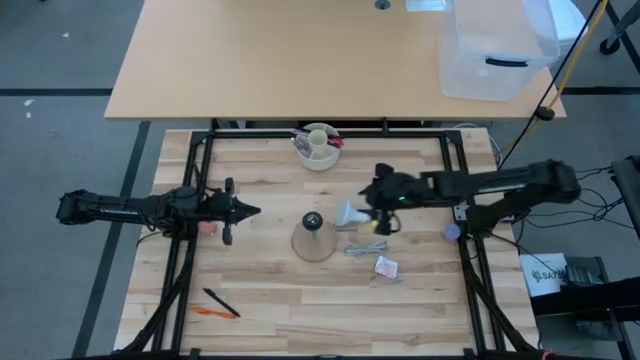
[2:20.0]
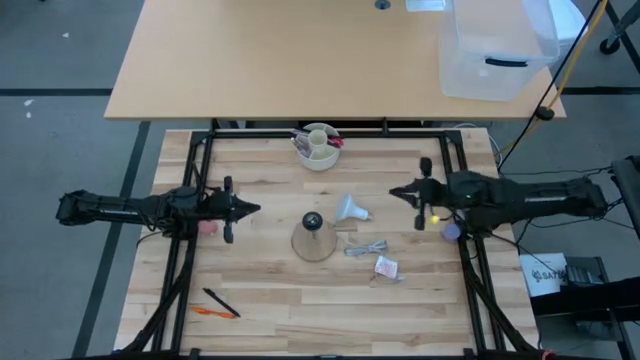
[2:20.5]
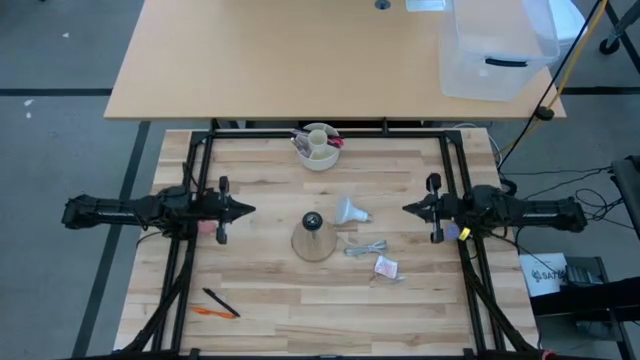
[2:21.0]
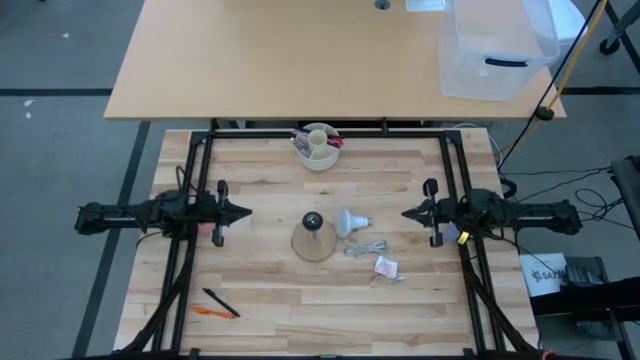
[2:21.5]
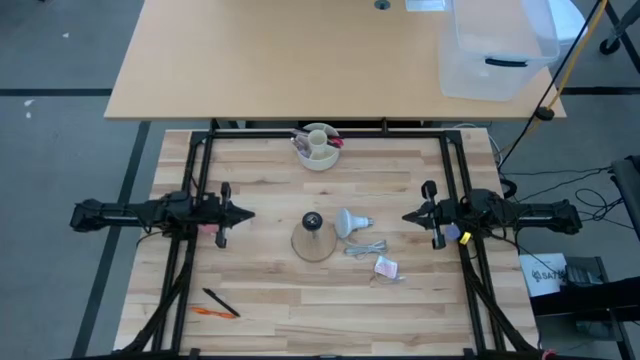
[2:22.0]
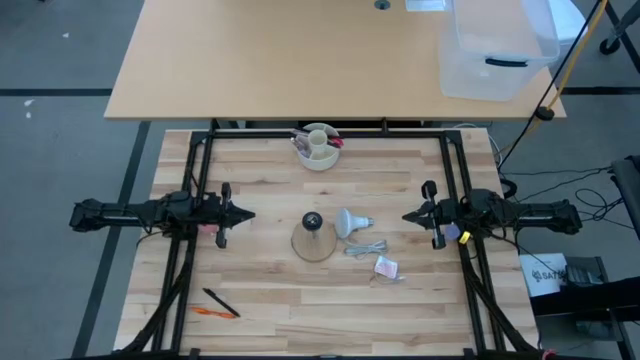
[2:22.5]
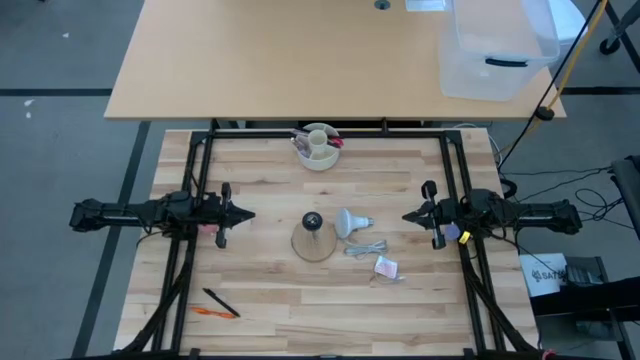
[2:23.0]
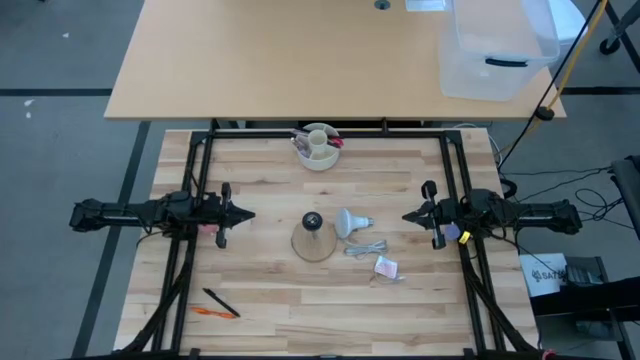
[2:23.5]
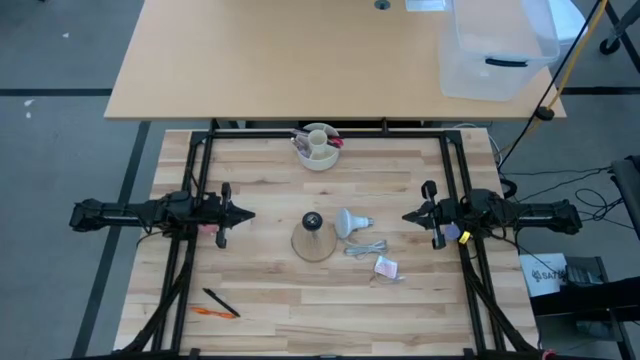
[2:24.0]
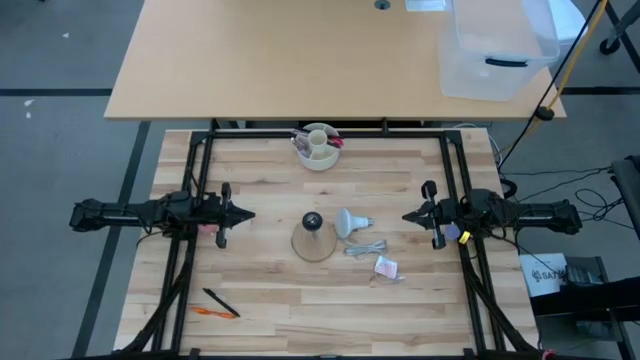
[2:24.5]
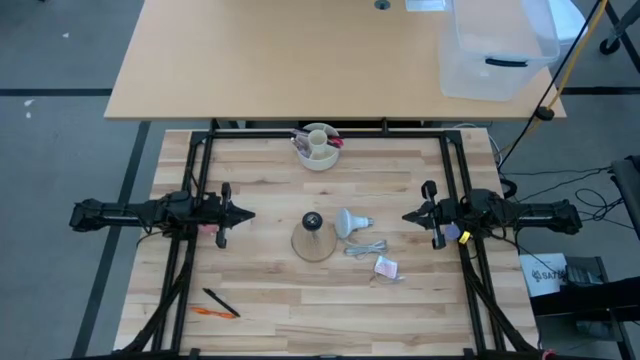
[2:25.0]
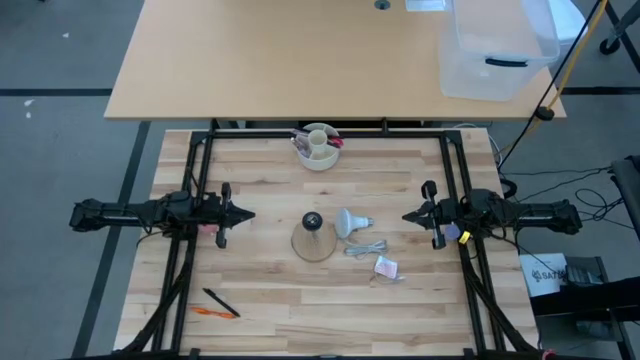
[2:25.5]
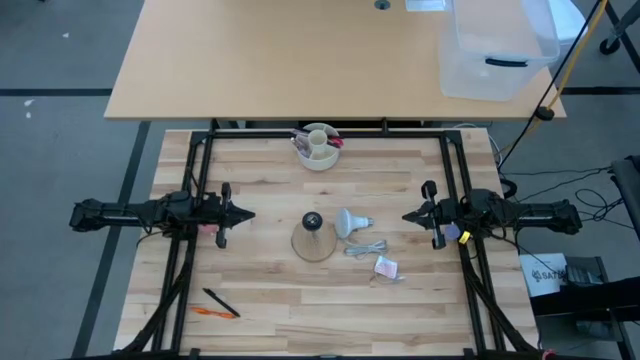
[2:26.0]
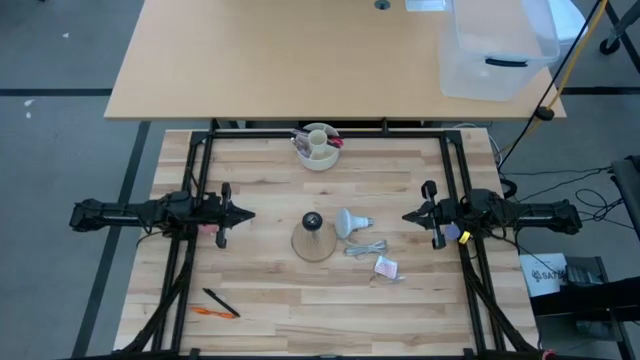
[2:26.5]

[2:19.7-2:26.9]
Task: Screw lightbulb
Return to Home Position

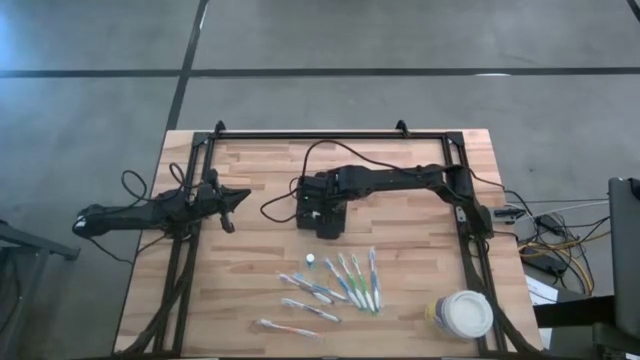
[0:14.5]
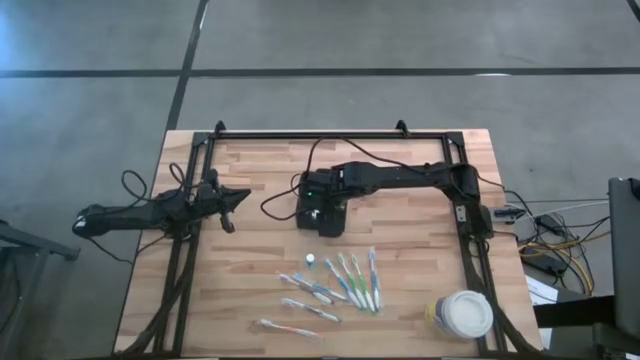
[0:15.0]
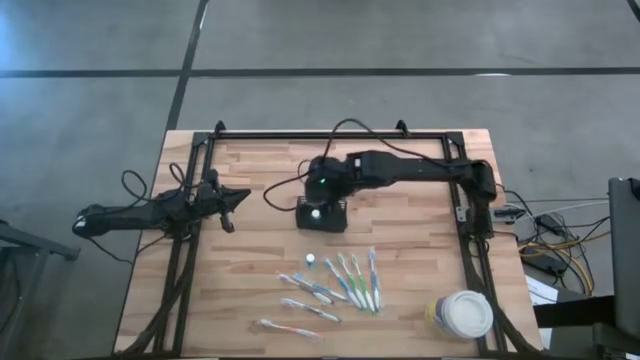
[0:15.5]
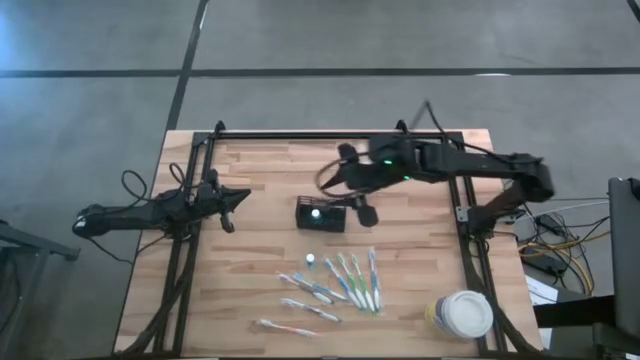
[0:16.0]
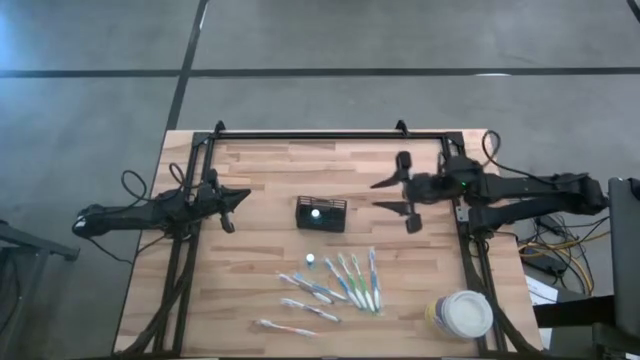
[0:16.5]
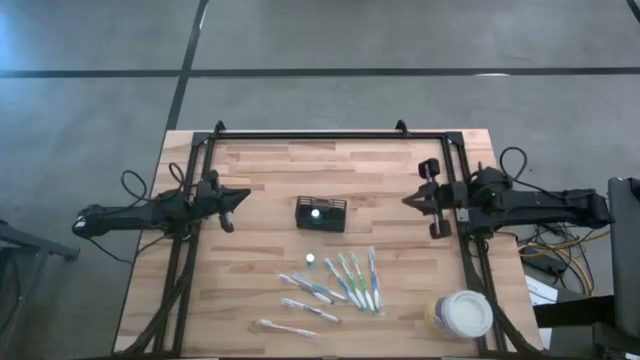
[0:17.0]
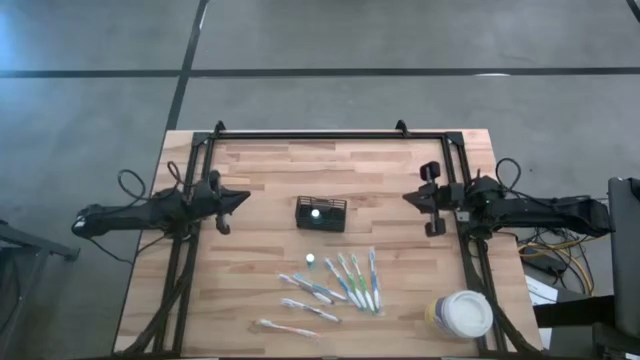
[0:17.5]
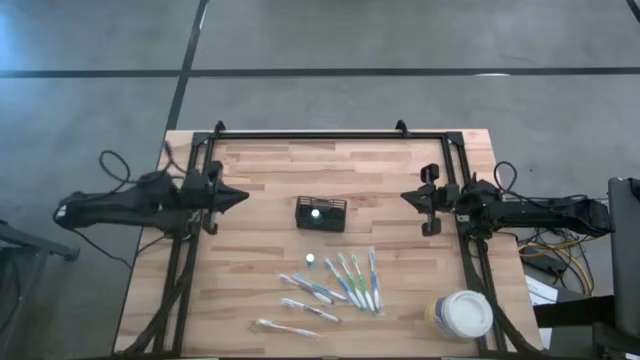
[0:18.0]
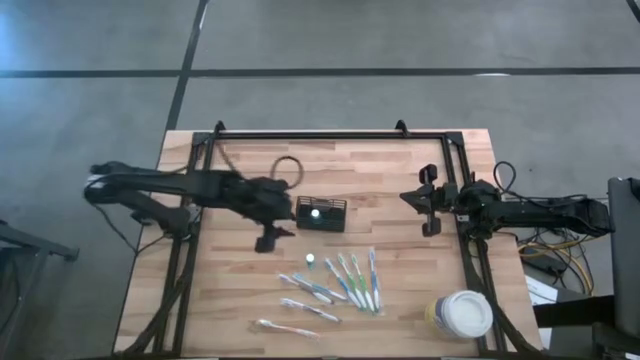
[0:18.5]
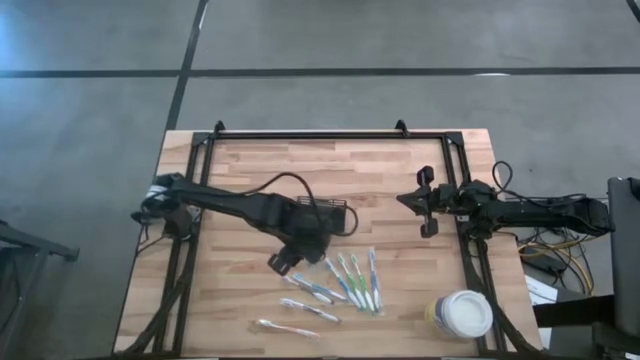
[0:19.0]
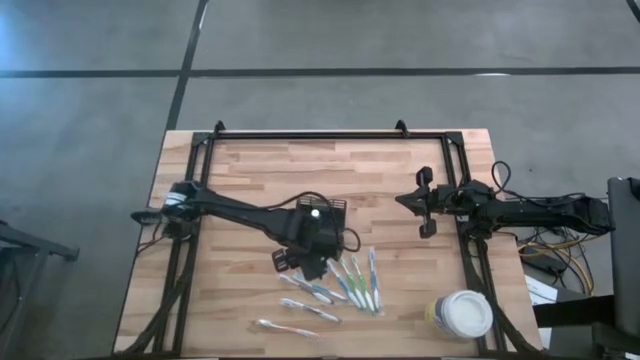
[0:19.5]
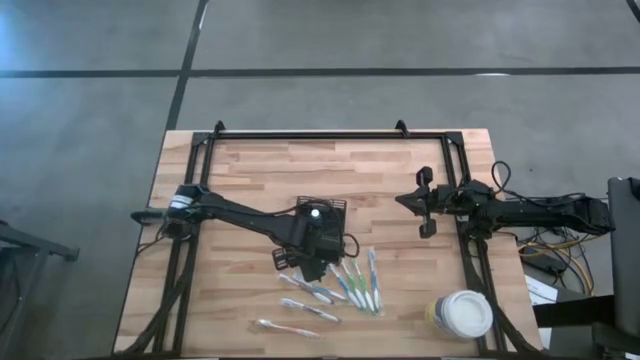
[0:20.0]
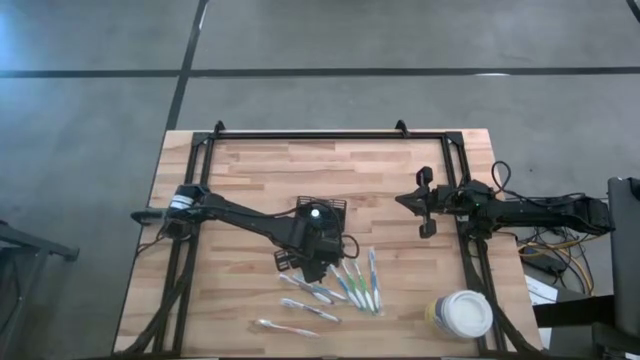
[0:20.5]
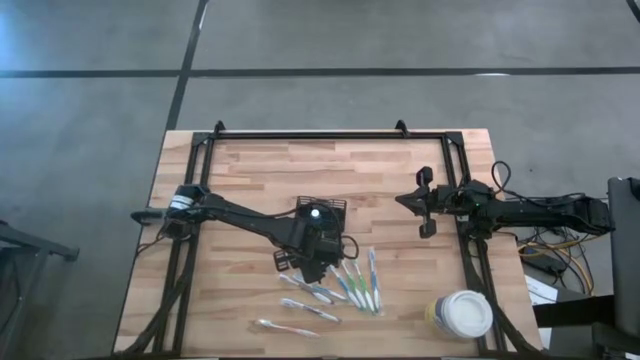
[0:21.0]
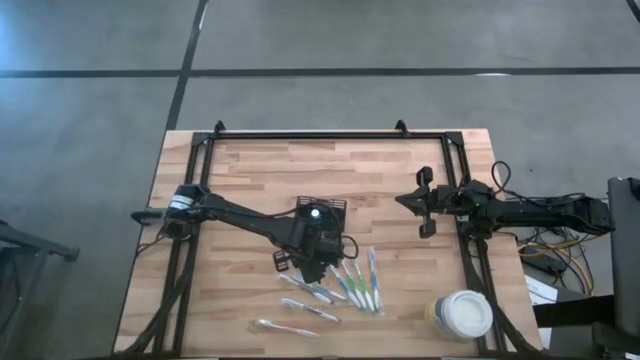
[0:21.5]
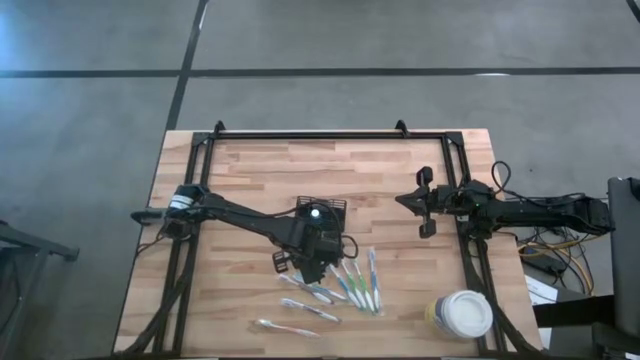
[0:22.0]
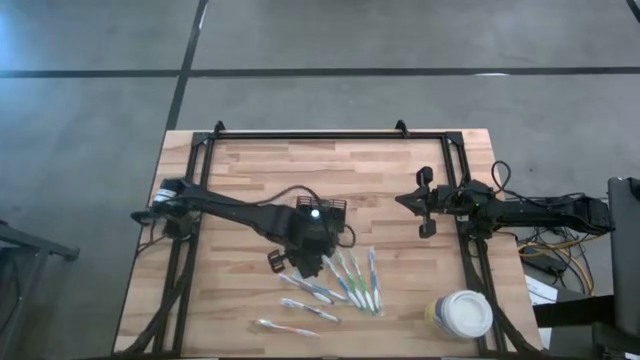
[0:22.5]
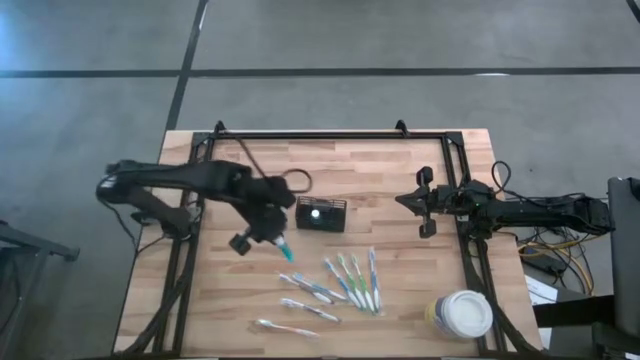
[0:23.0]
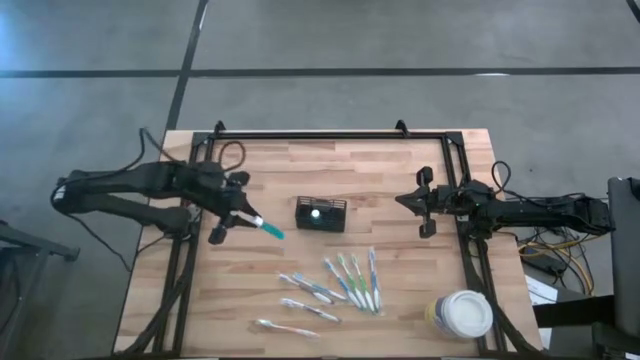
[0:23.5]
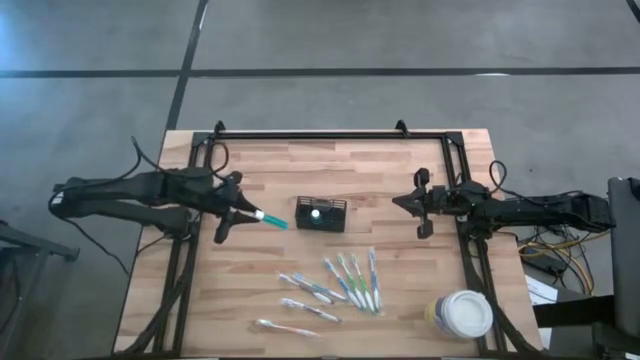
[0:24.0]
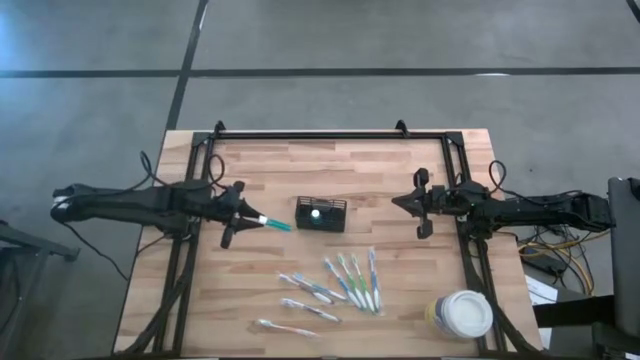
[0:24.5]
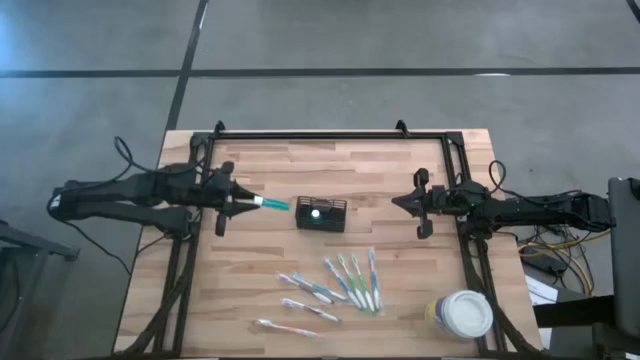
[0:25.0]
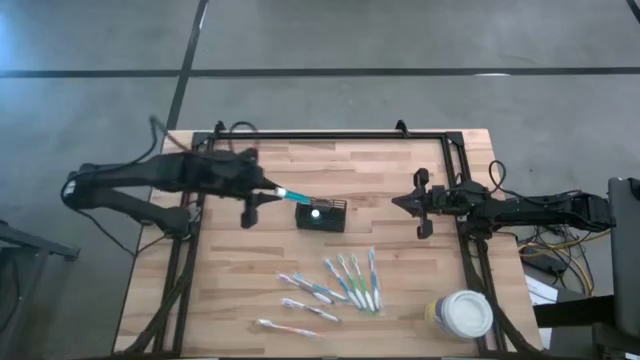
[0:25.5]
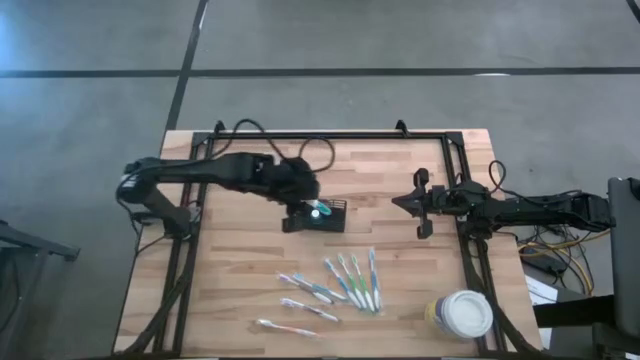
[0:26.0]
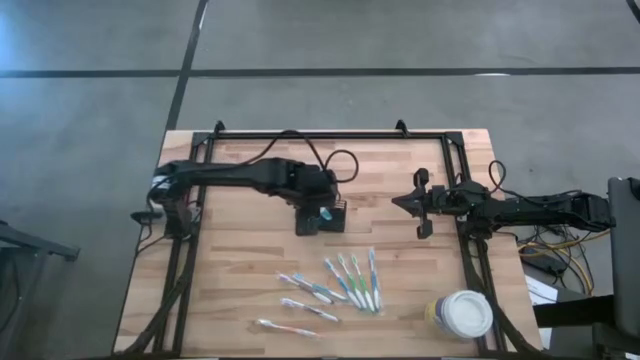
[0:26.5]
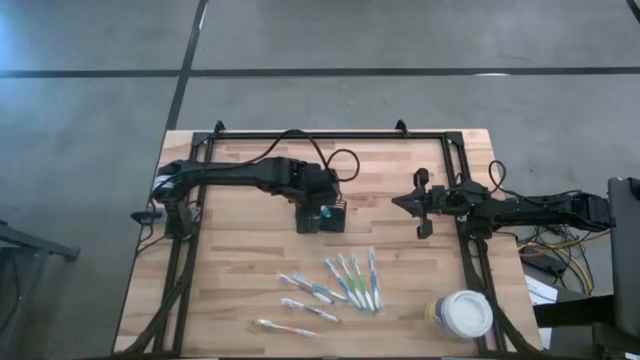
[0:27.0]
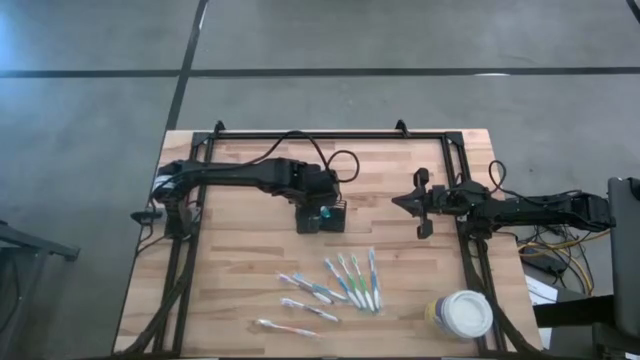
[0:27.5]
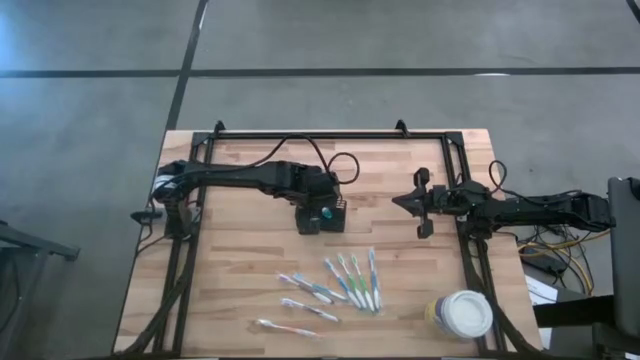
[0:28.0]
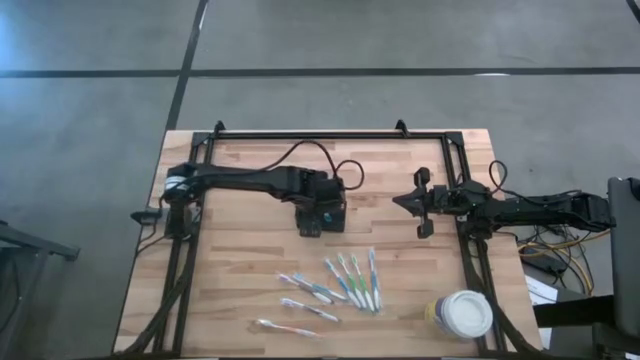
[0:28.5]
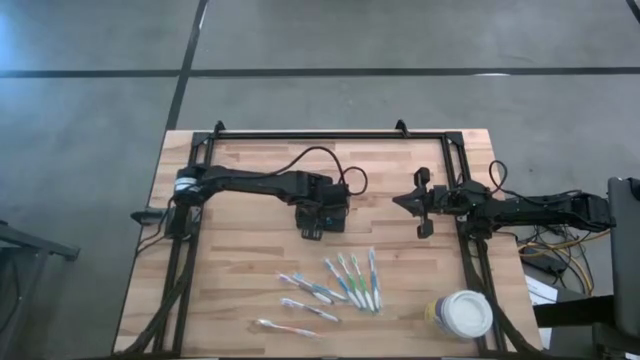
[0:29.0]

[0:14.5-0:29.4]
Task: Pick & Place toothbrushing station
Put the mouthwash into the wire organizer
